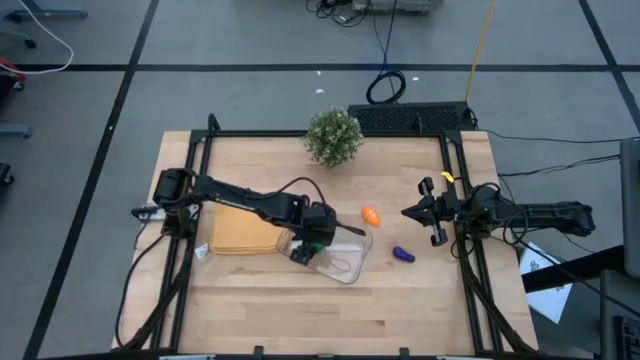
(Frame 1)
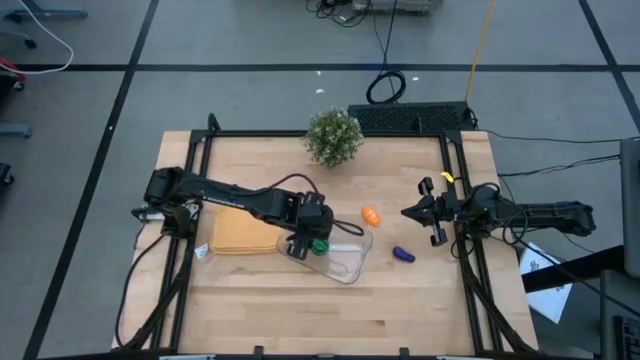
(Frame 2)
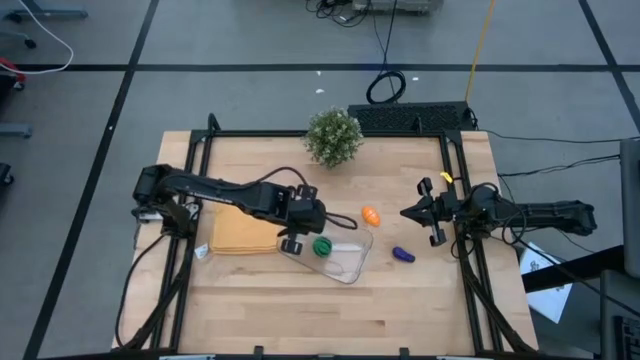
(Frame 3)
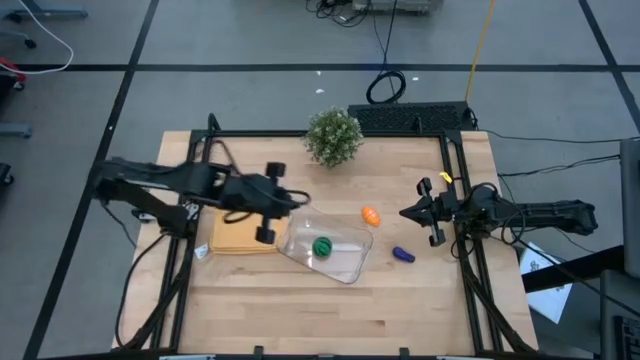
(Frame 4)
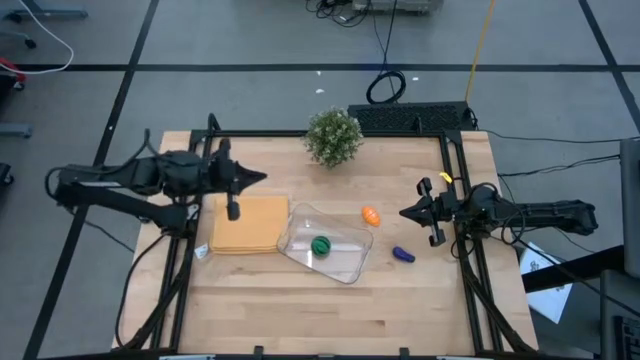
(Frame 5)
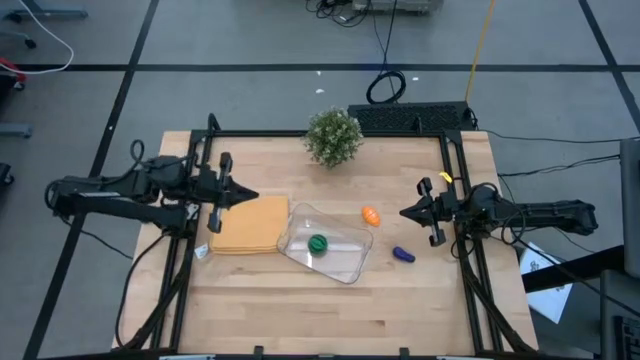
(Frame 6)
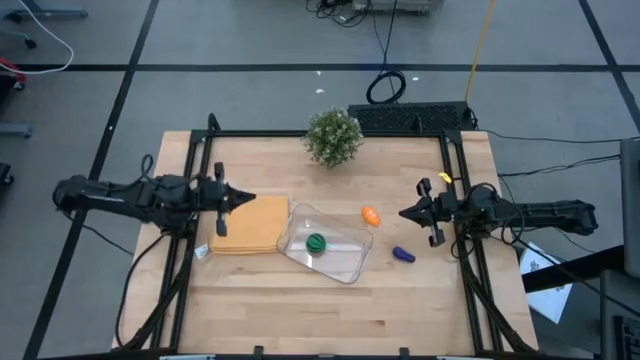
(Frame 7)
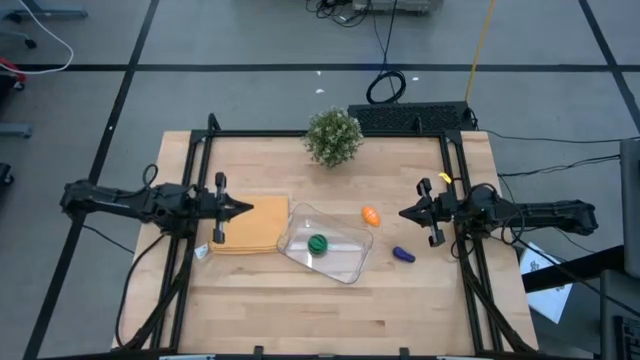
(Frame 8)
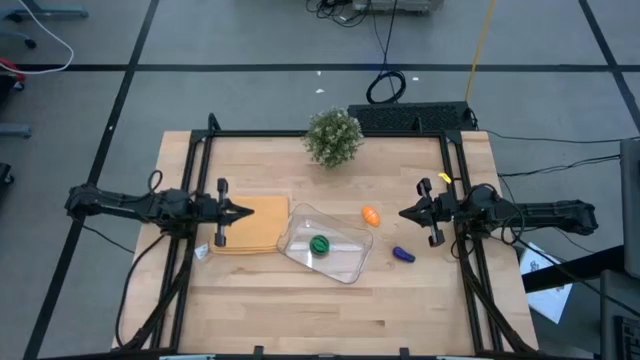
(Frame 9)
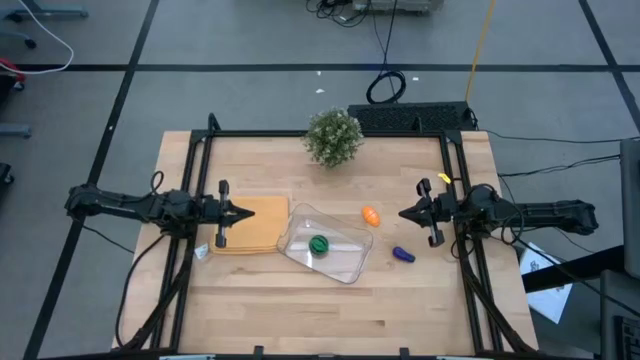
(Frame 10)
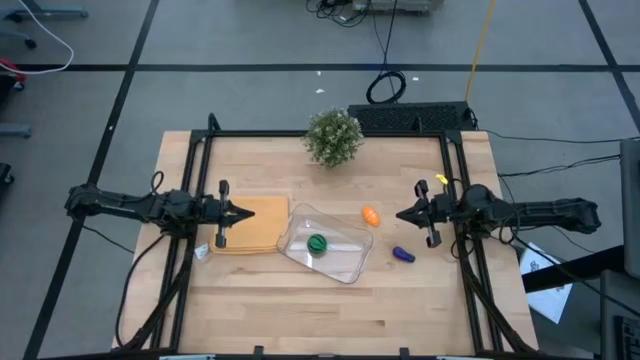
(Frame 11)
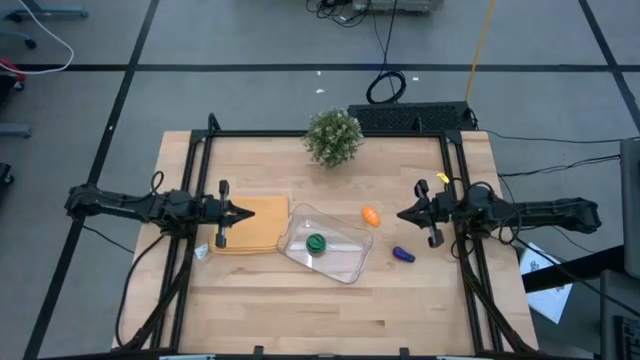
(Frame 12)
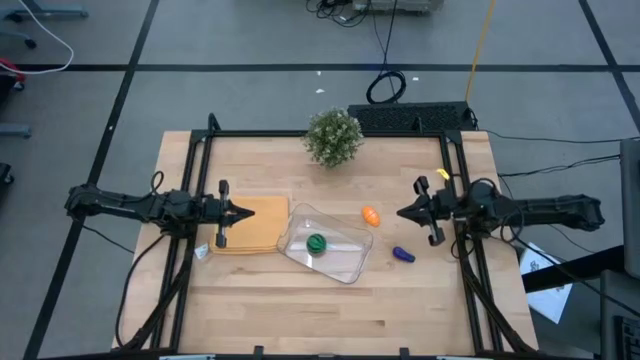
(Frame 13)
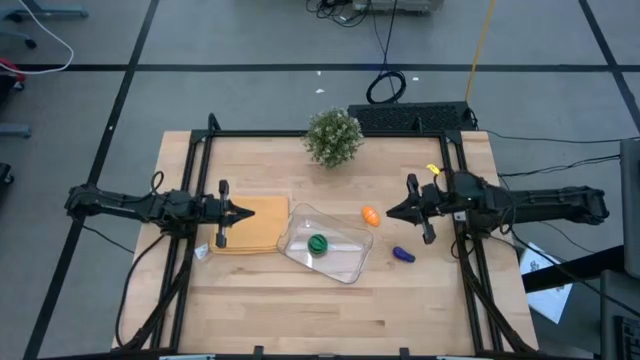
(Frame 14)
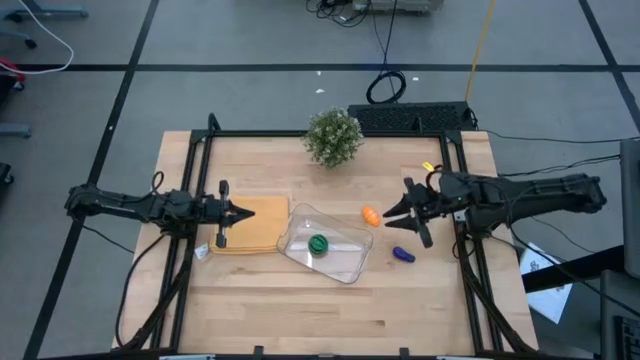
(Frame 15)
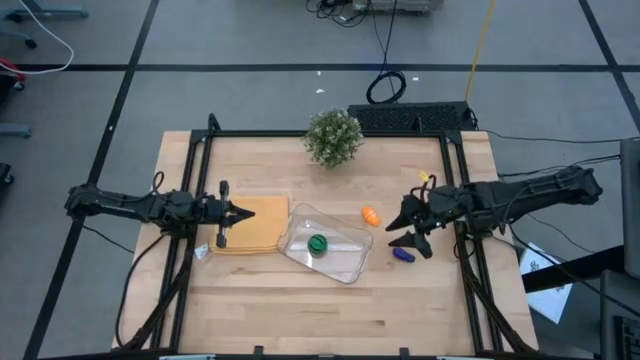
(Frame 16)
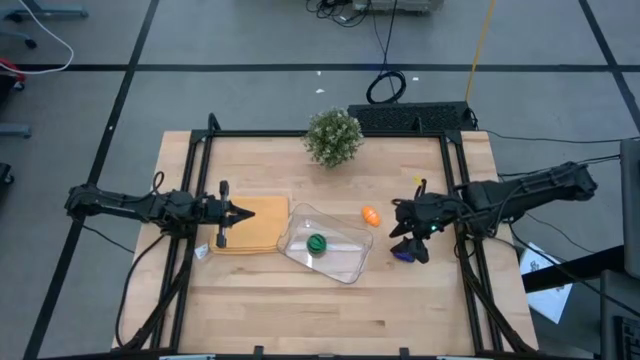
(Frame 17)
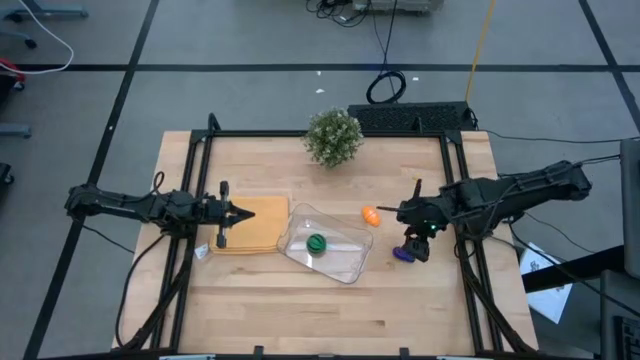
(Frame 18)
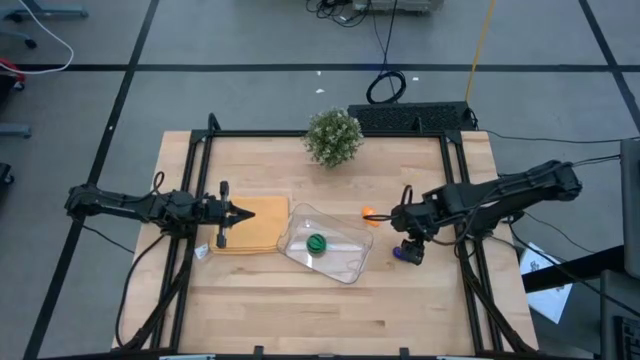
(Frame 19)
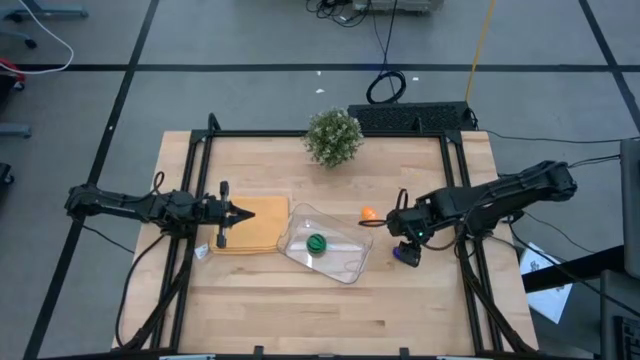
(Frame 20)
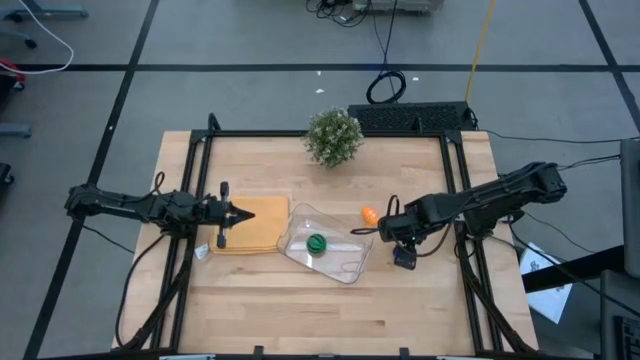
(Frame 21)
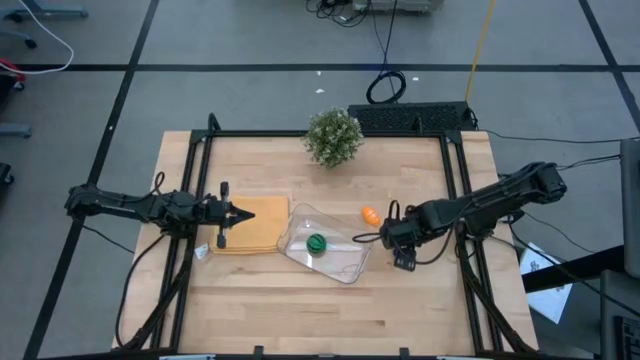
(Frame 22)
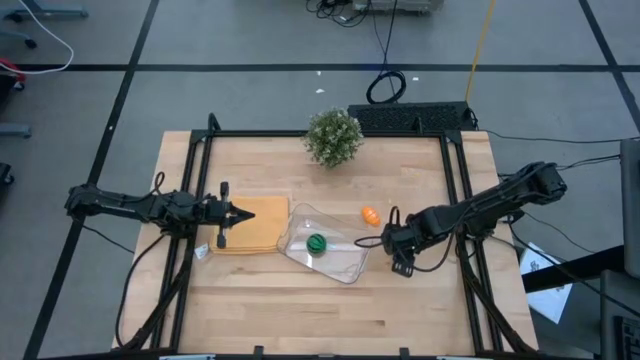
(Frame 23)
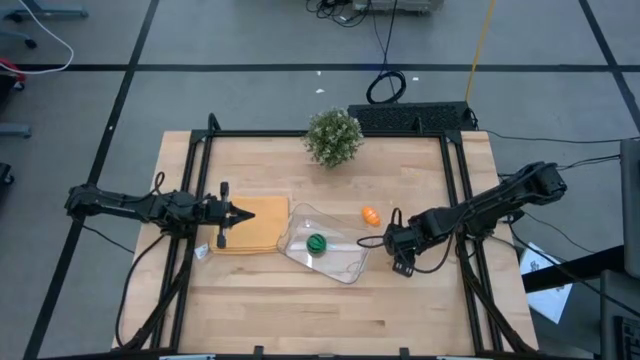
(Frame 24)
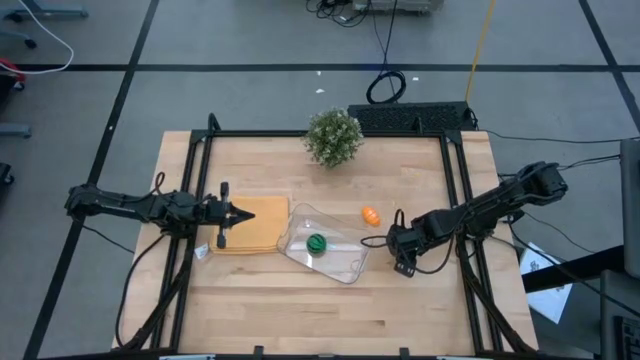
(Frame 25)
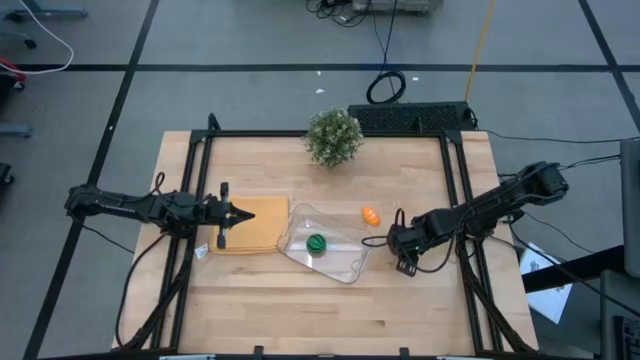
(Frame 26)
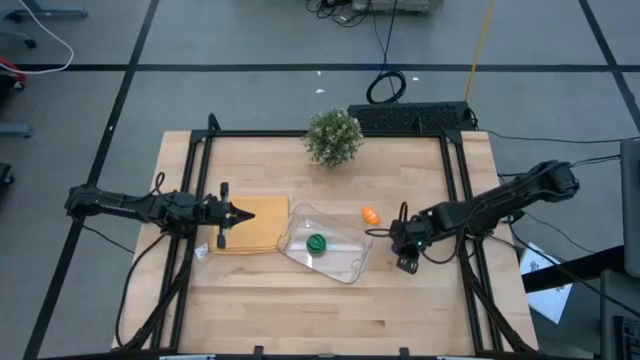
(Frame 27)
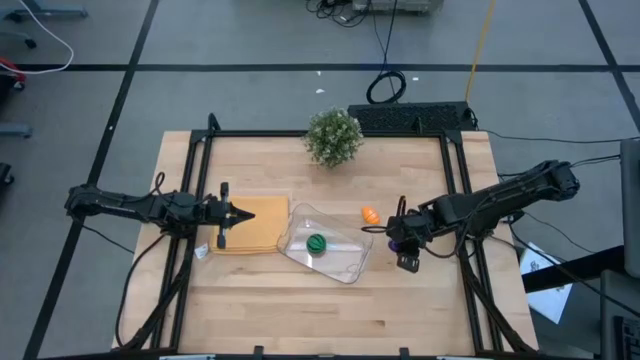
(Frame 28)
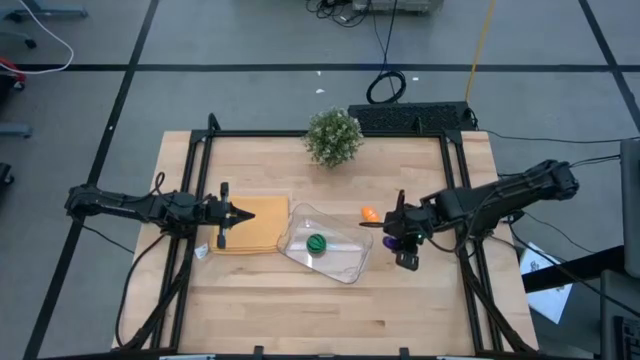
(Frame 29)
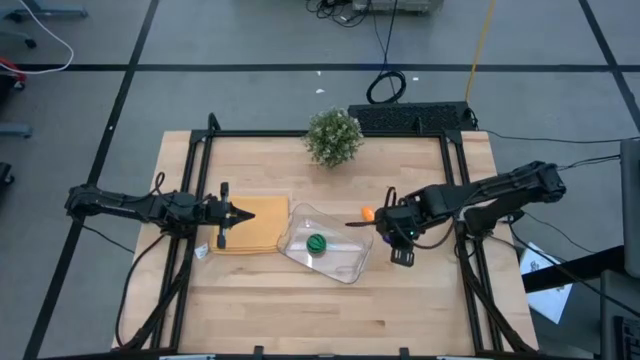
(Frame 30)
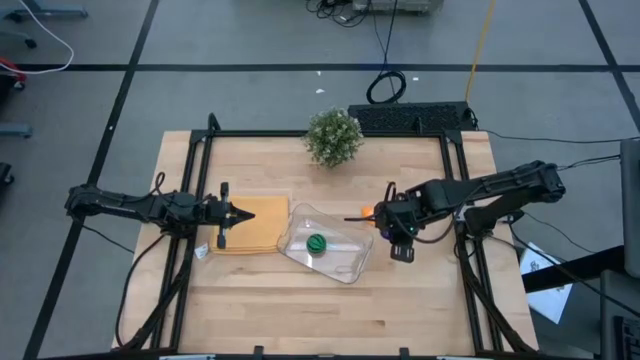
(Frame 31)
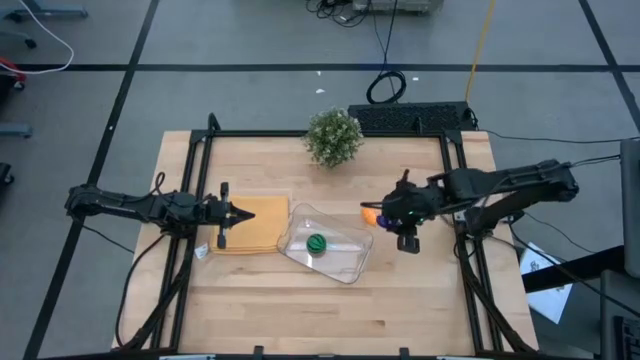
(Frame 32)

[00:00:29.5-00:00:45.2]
Task: Pick and placing Produce into tupperware
Put the eggplant into the transparent bin

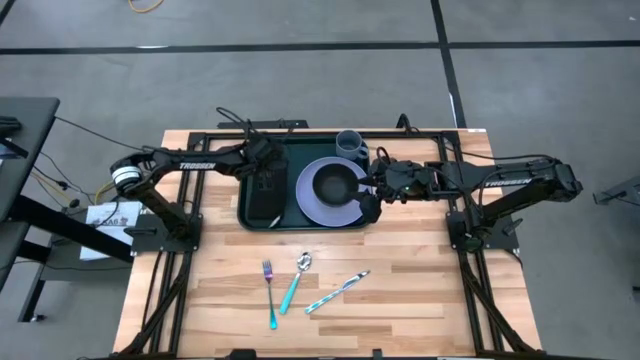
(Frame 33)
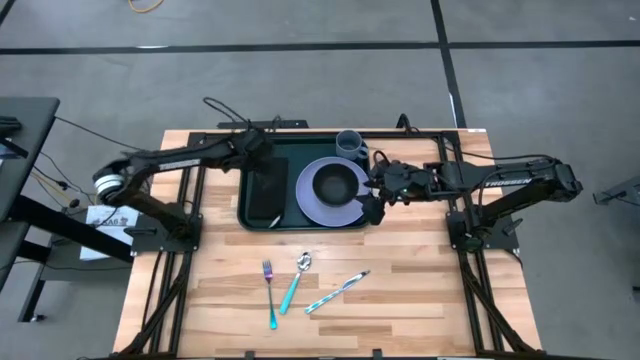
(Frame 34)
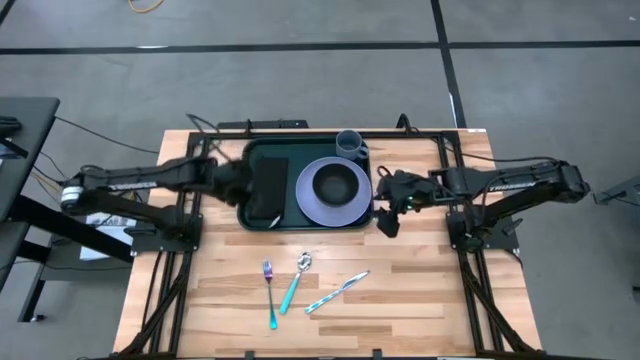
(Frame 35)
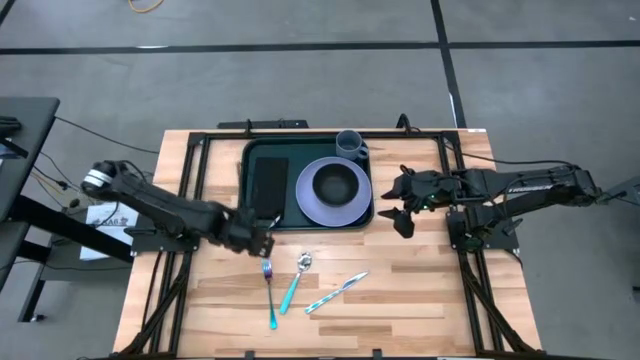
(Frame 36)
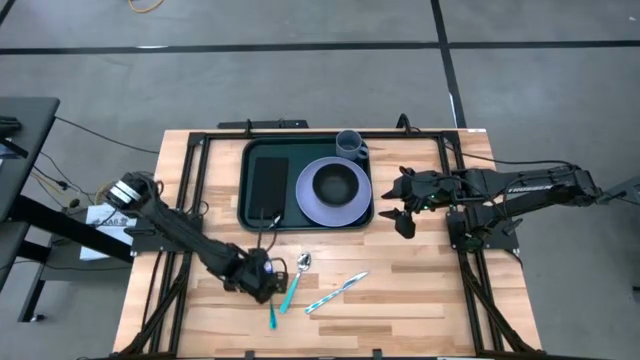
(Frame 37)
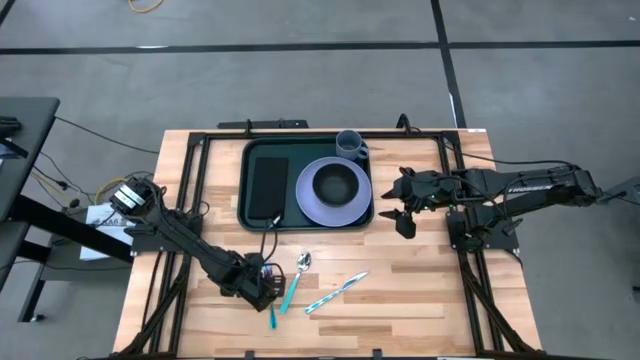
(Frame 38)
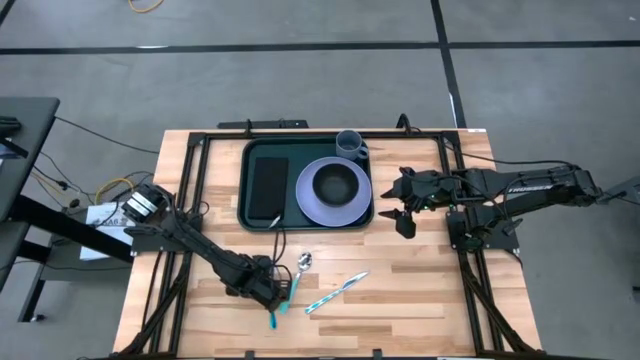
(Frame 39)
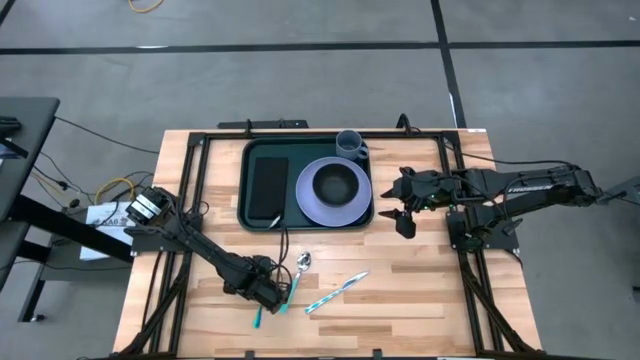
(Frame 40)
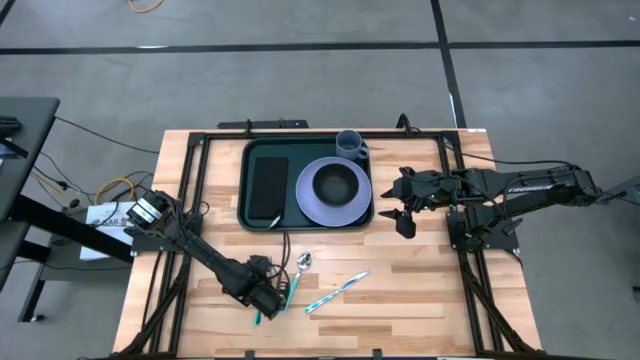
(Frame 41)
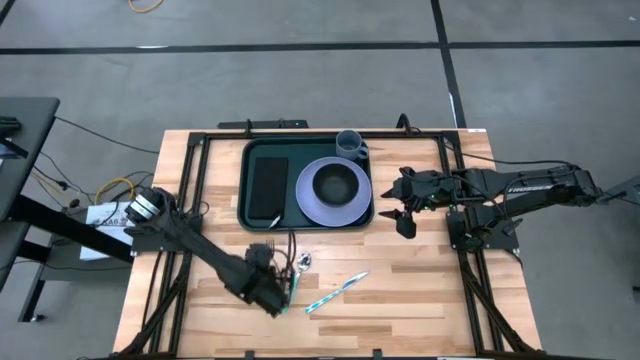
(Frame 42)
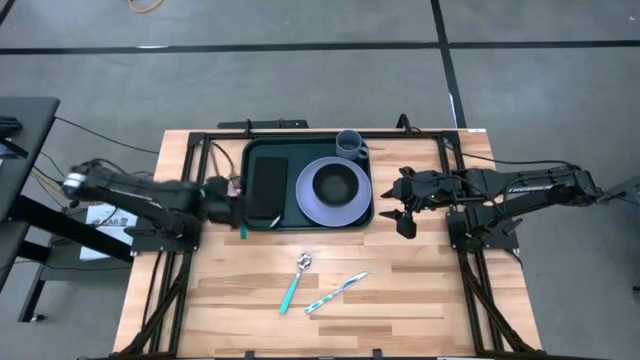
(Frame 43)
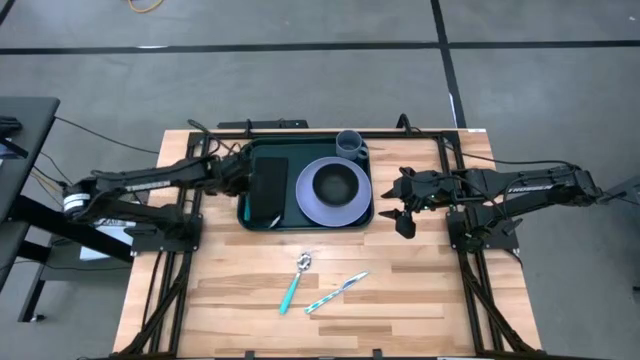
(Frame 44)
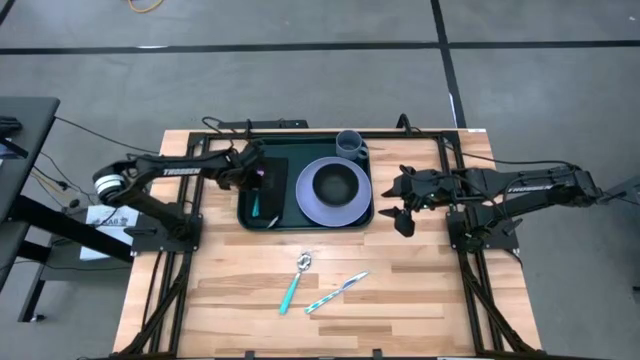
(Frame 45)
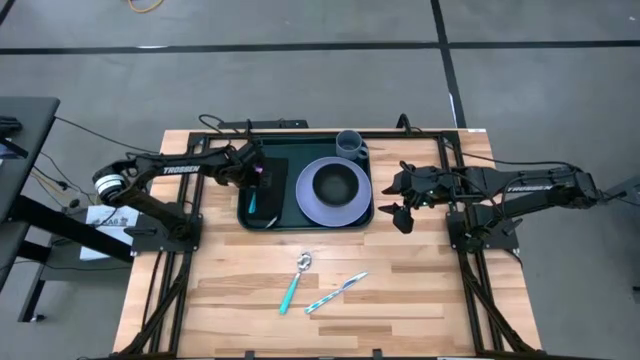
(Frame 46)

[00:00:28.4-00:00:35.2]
Task: Set up tray
Put the blue fork on top of the black napkin
